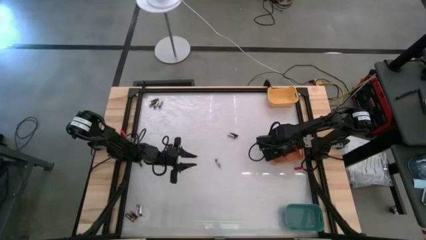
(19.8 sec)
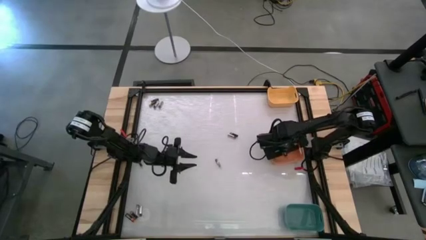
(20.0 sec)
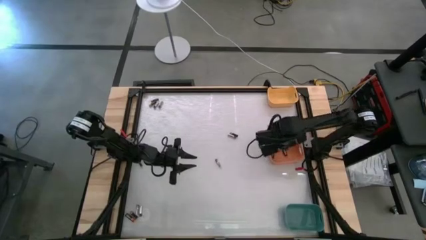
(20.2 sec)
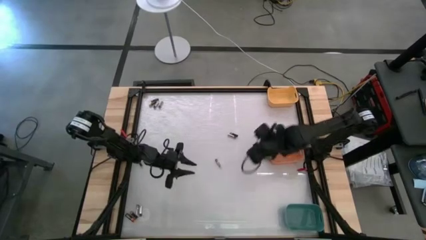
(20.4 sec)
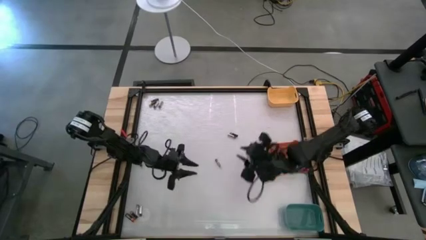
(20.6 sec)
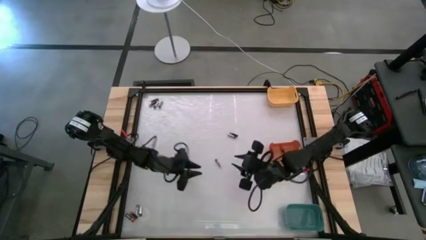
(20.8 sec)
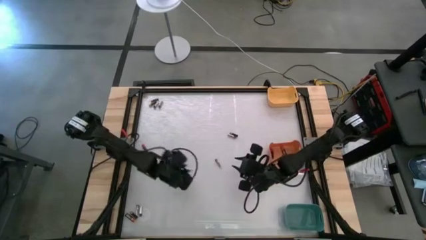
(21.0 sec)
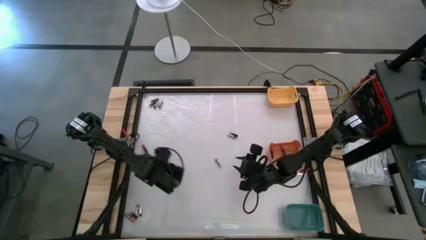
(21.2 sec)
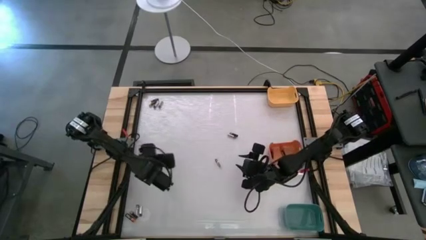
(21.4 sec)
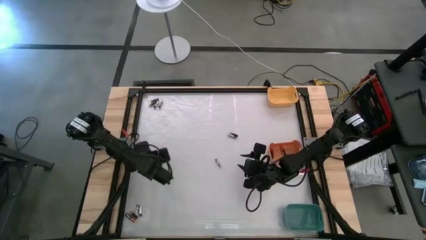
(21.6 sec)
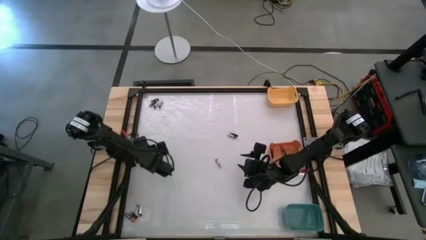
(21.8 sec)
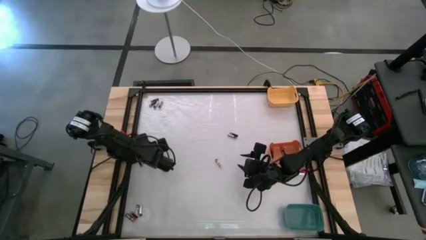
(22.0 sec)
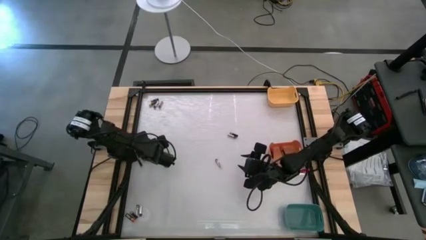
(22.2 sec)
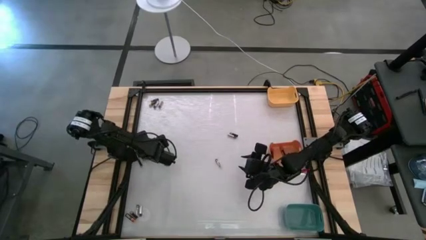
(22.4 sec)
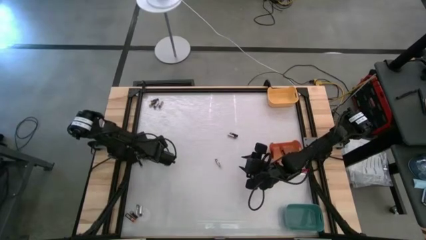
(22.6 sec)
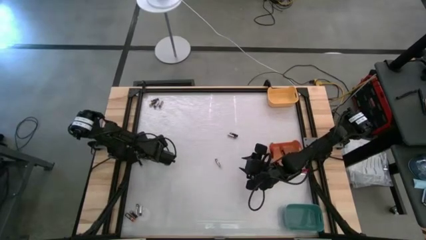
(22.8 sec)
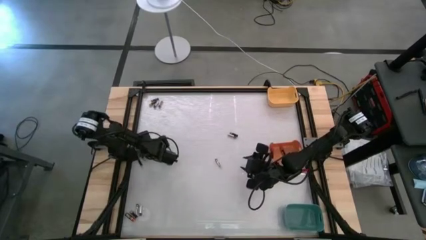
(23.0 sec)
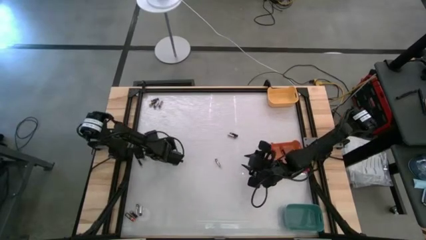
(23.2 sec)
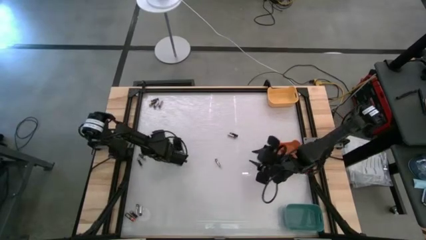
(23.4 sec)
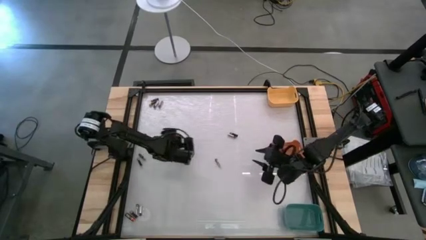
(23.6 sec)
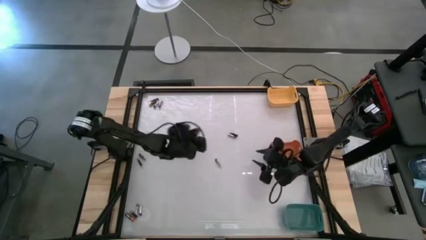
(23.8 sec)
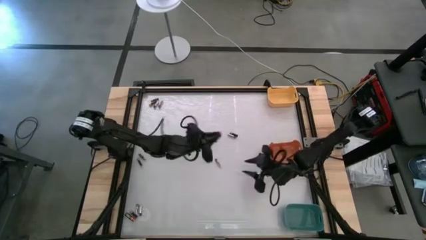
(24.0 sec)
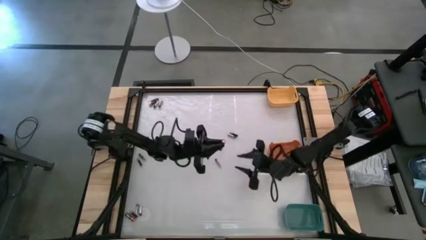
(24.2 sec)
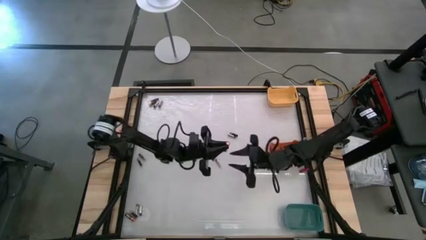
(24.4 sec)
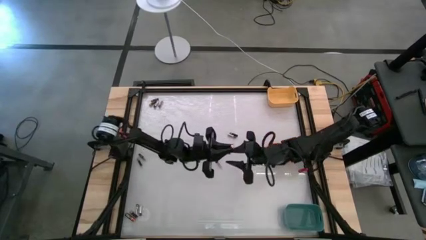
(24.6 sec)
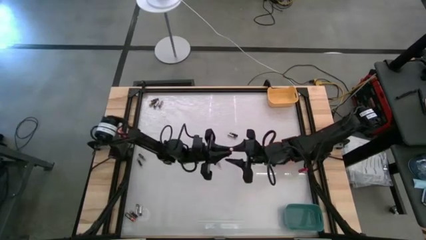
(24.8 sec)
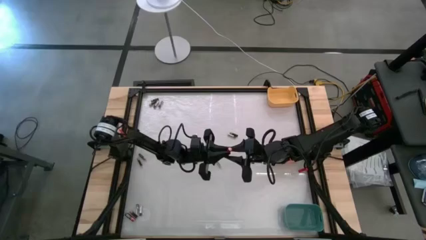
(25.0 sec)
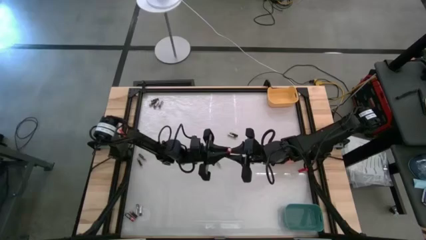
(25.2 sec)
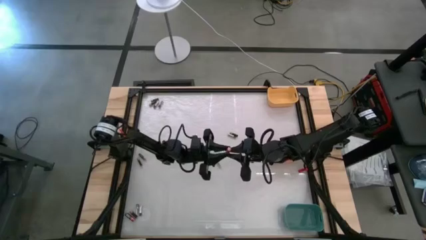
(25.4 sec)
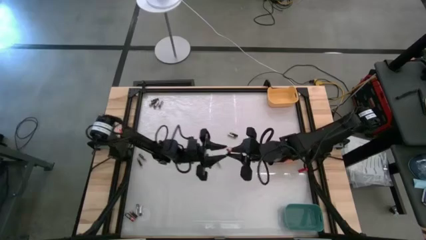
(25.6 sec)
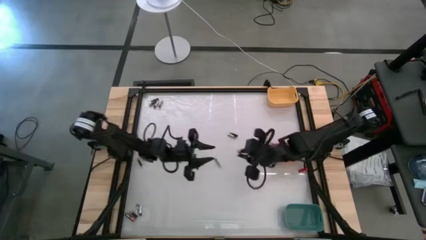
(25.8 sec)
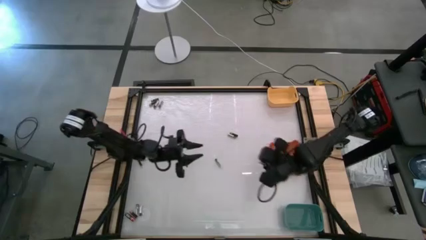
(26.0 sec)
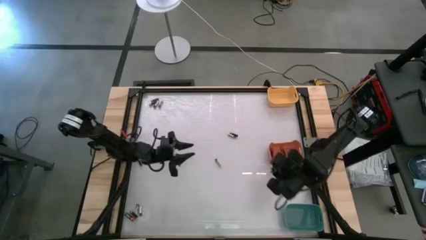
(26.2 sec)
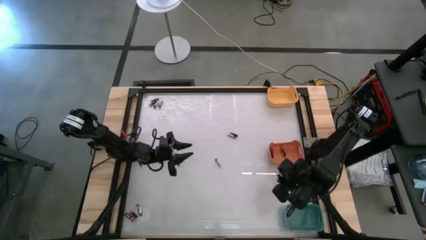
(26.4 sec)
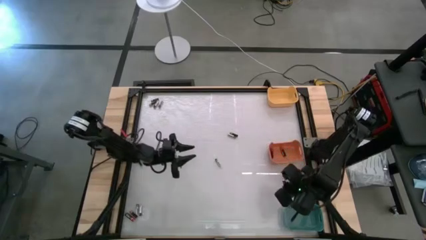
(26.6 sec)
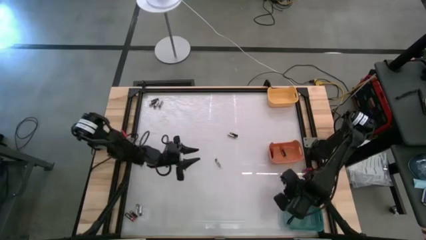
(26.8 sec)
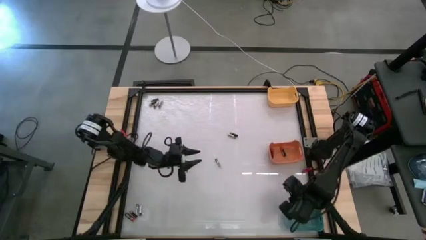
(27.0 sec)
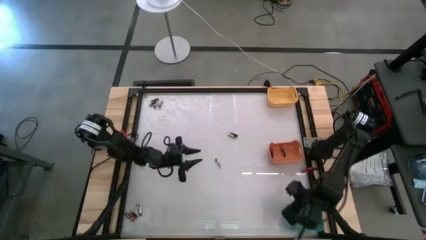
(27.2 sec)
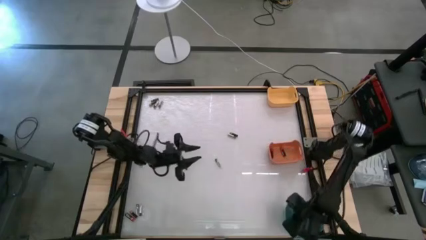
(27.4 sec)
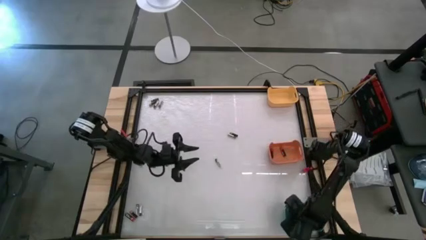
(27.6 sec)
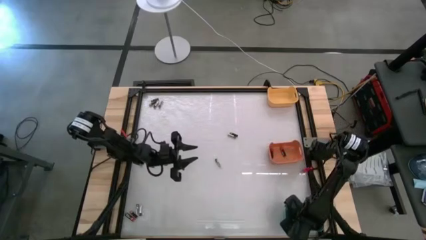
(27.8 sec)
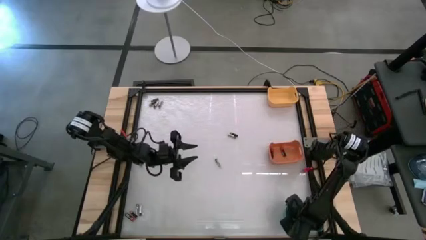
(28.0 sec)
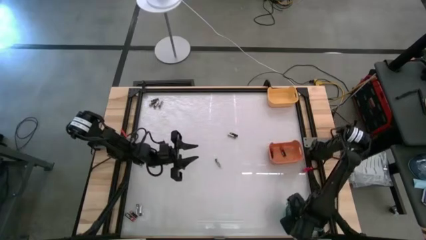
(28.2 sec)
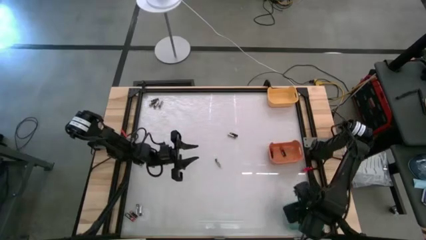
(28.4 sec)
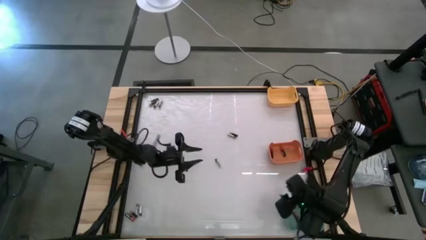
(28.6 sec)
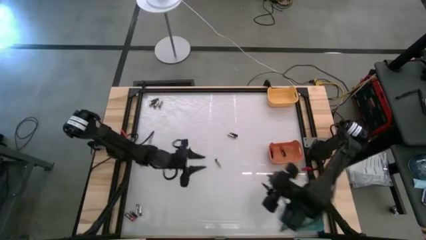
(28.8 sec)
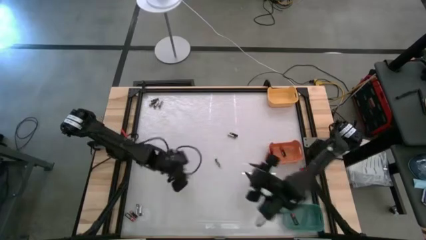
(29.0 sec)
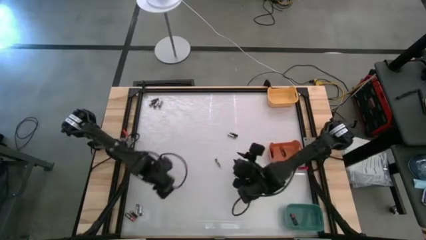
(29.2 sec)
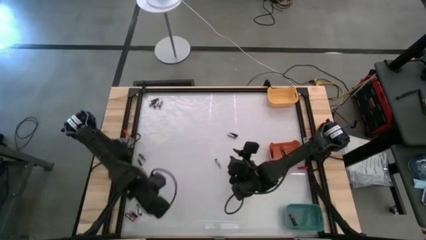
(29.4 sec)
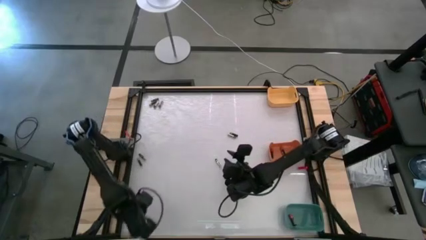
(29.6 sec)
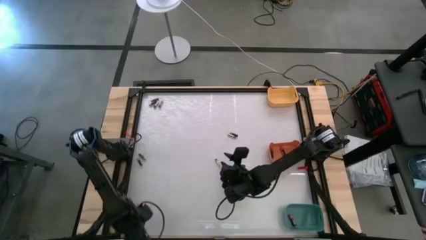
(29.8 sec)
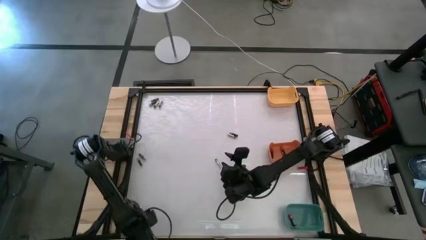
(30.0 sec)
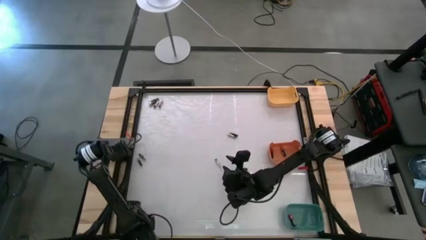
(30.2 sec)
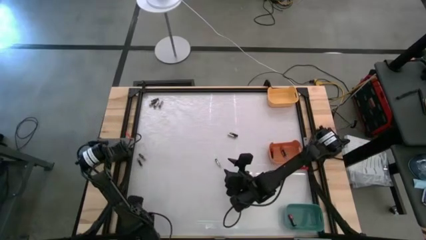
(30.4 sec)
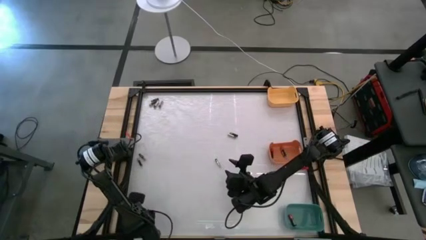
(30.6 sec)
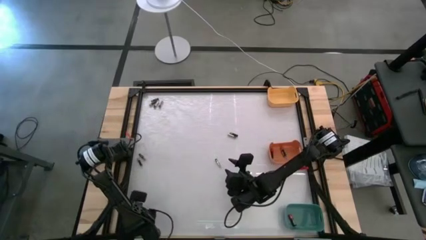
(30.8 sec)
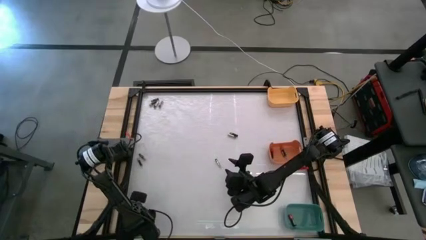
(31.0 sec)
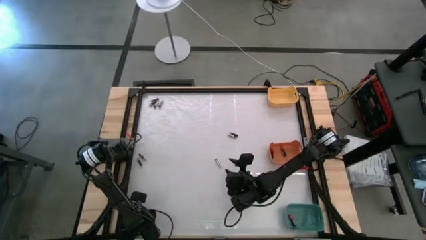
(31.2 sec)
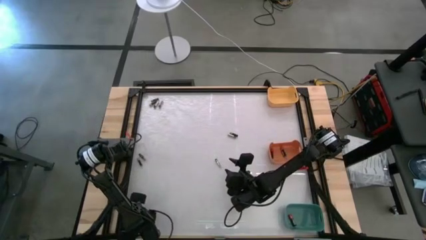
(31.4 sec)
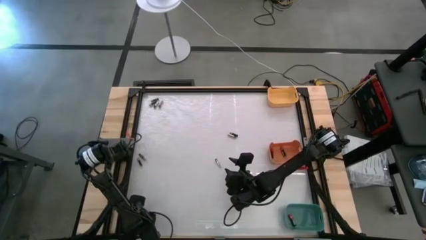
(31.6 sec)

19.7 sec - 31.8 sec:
Task: Sort batteries
Put the black-red battery into the orange bin

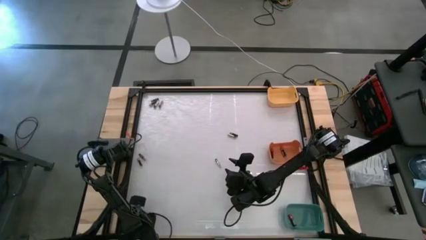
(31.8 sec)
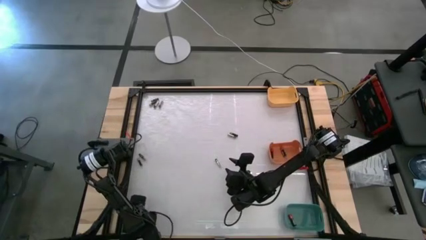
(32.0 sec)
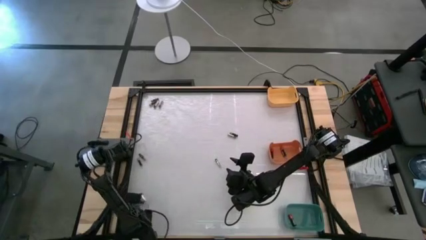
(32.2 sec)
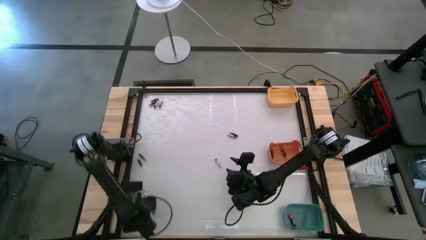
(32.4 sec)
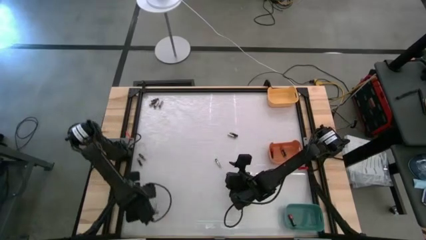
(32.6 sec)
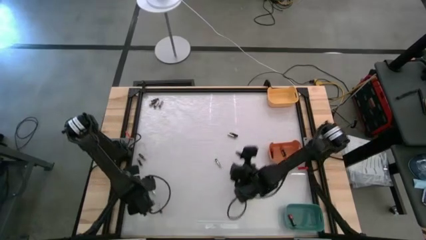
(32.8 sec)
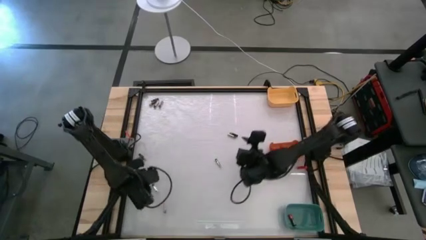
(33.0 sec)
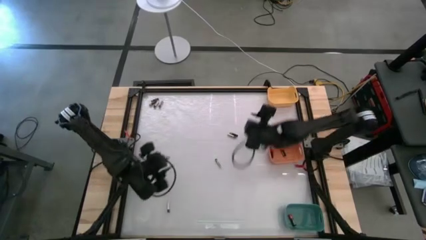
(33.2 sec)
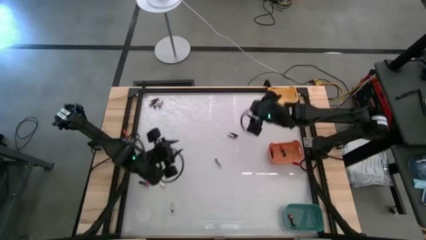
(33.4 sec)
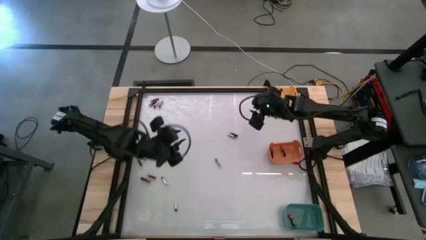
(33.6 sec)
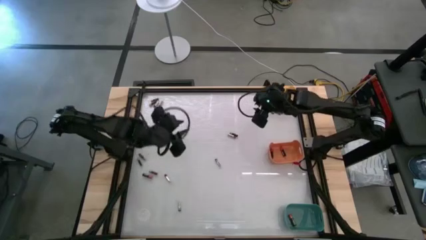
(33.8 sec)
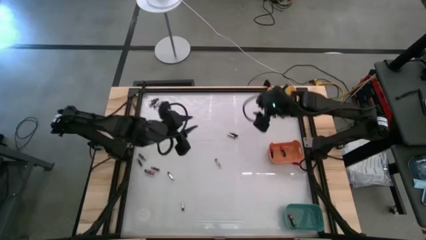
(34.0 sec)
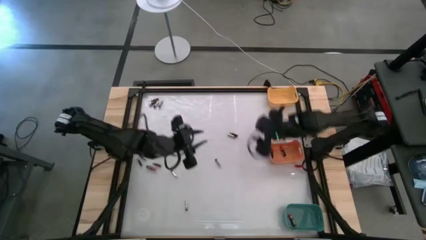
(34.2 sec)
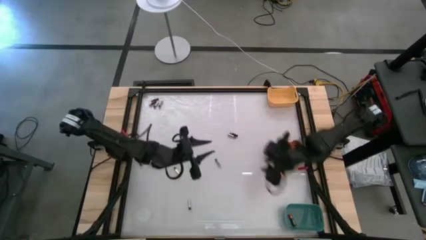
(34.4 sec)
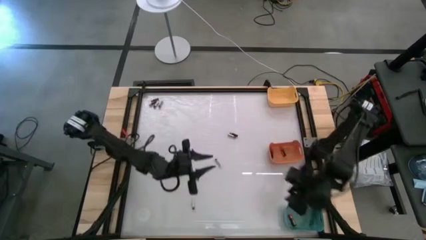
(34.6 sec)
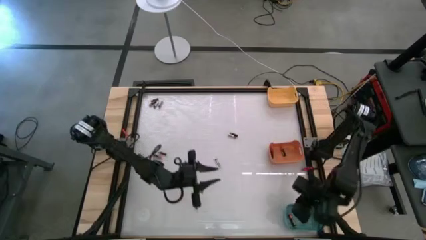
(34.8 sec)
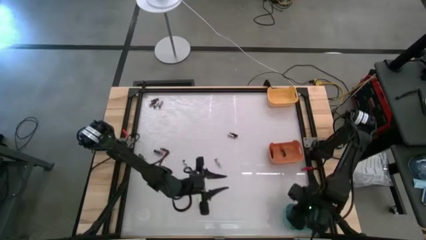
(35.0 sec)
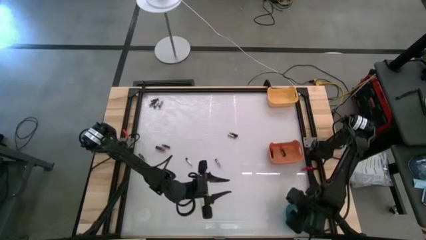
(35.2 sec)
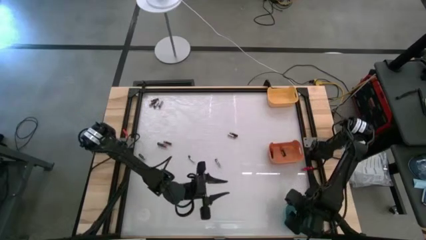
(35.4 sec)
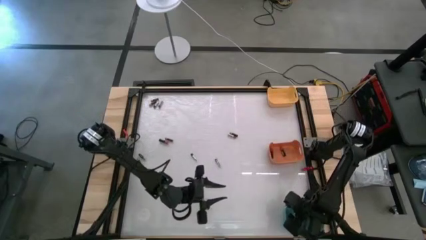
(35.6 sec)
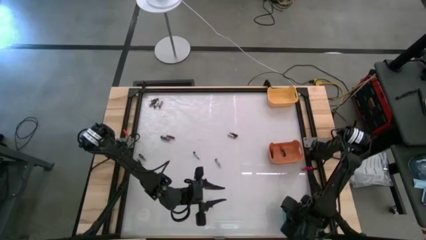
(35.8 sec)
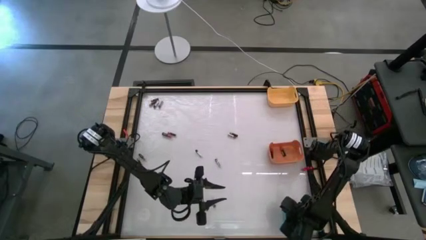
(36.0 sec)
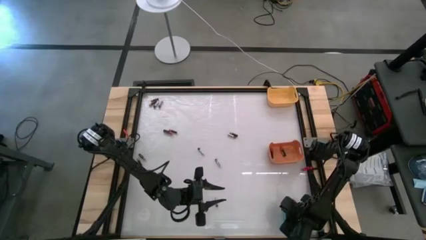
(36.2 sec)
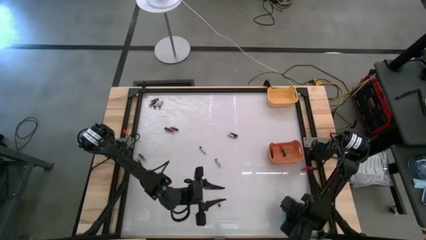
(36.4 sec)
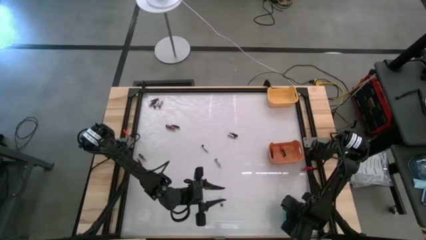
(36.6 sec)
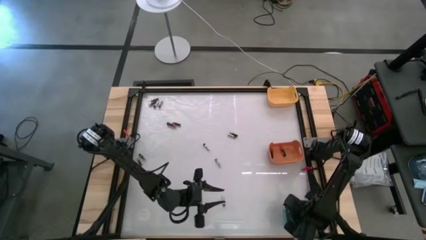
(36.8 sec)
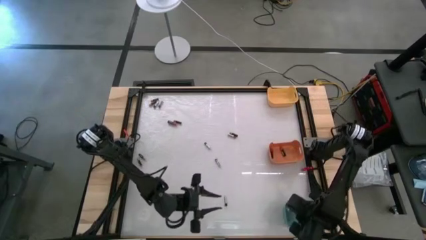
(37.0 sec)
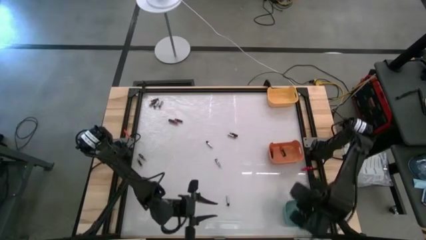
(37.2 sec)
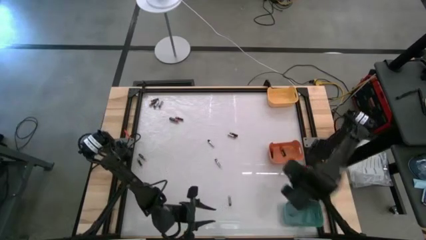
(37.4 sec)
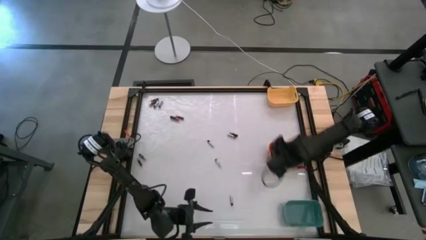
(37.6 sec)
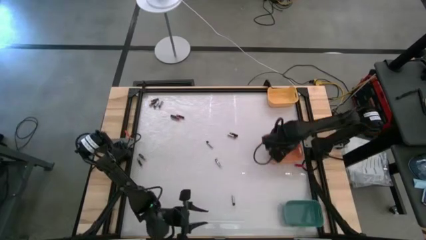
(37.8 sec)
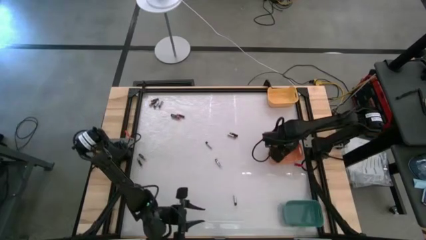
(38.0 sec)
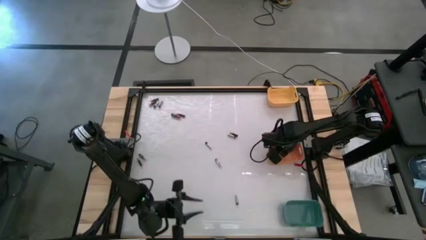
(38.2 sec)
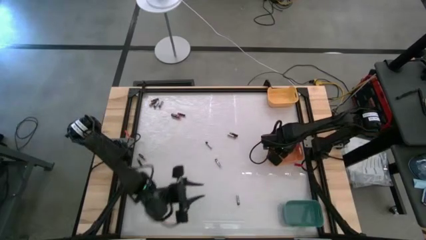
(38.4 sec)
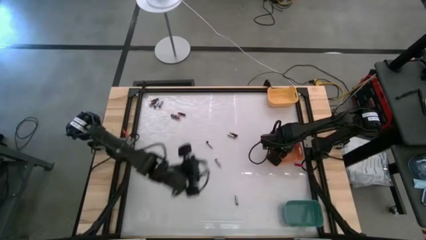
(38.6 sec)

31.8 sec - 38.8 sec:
Put the black-red battery into the orange bin
